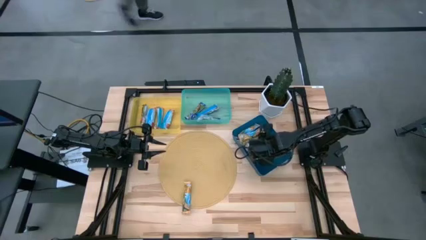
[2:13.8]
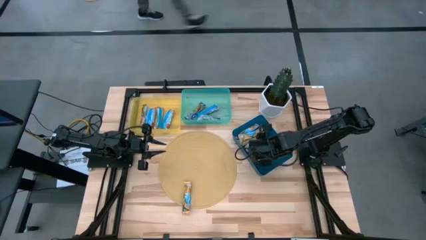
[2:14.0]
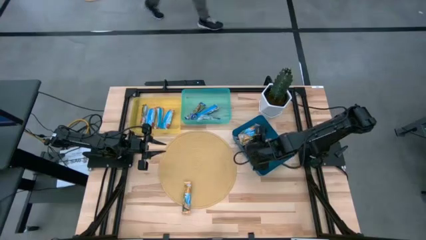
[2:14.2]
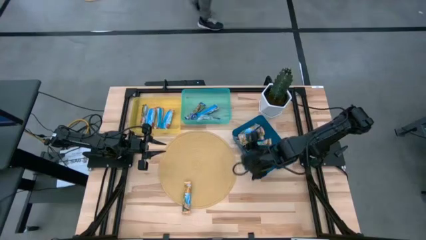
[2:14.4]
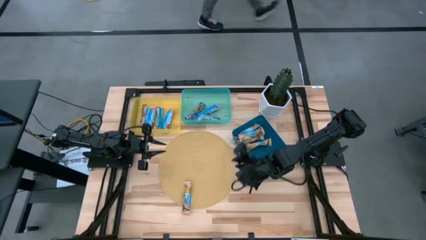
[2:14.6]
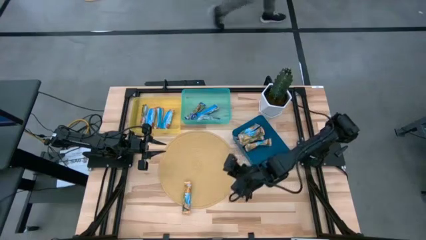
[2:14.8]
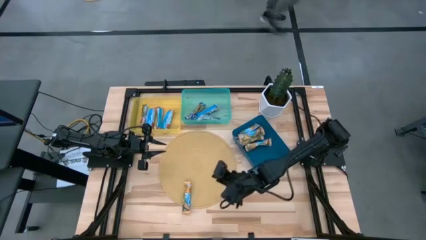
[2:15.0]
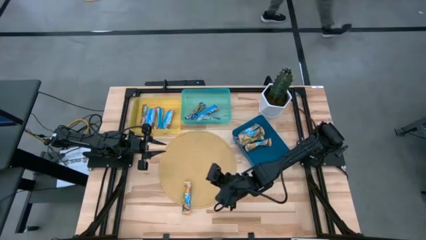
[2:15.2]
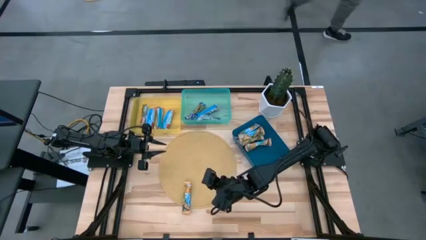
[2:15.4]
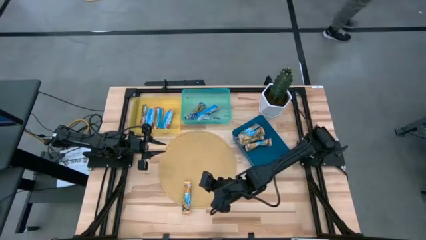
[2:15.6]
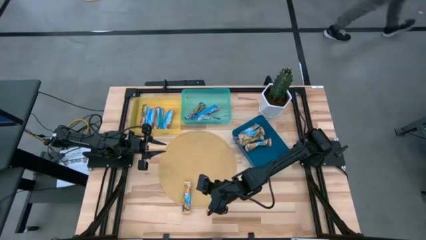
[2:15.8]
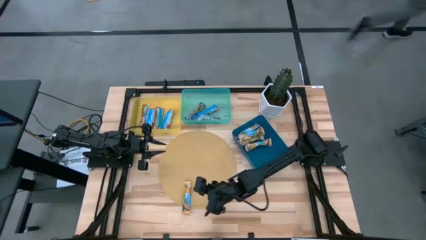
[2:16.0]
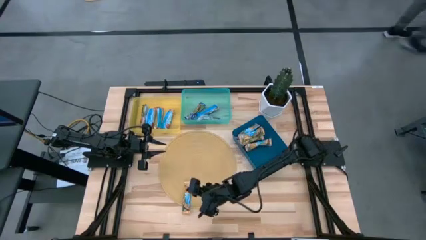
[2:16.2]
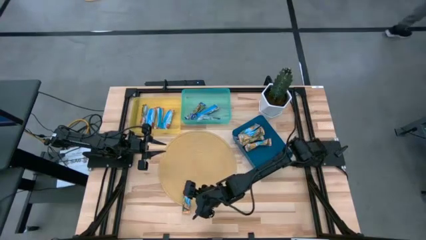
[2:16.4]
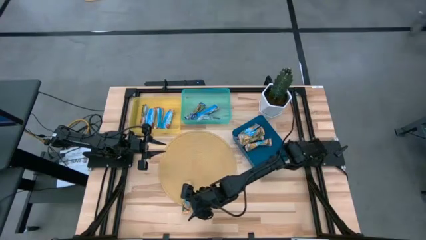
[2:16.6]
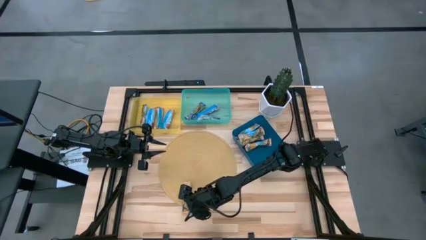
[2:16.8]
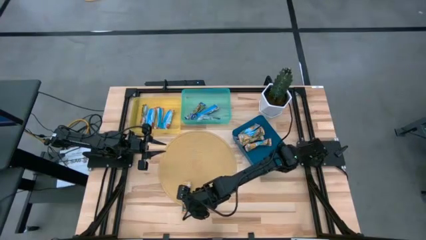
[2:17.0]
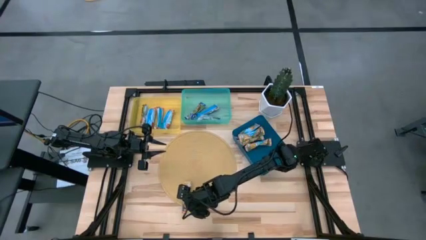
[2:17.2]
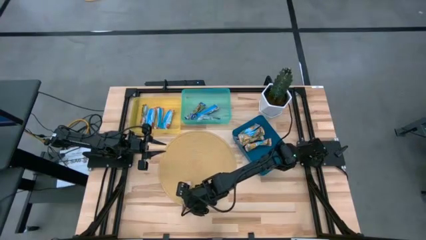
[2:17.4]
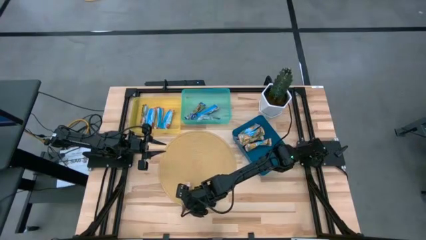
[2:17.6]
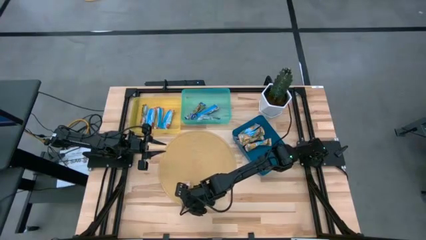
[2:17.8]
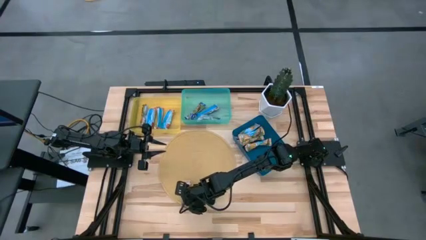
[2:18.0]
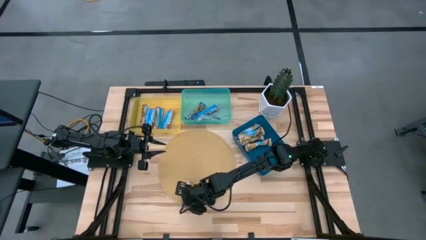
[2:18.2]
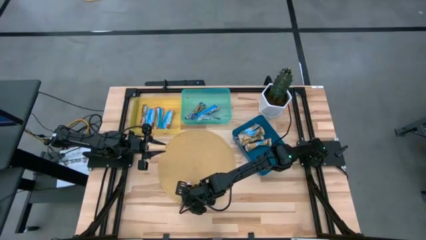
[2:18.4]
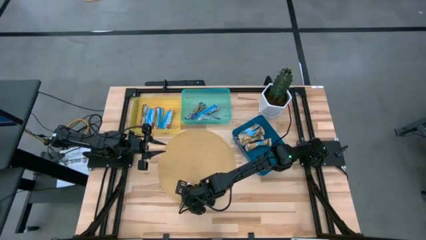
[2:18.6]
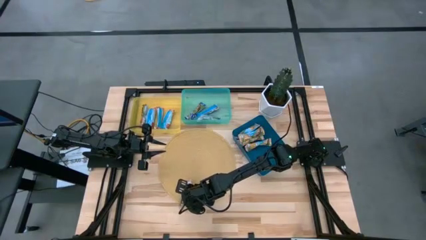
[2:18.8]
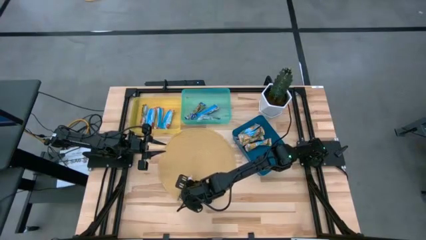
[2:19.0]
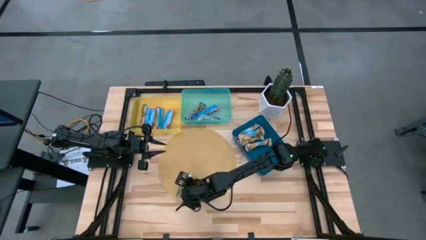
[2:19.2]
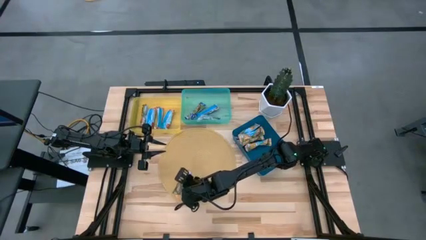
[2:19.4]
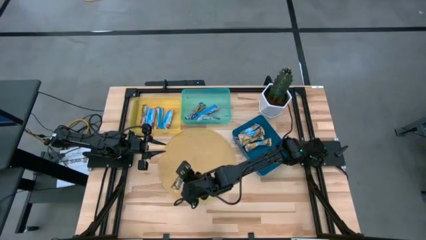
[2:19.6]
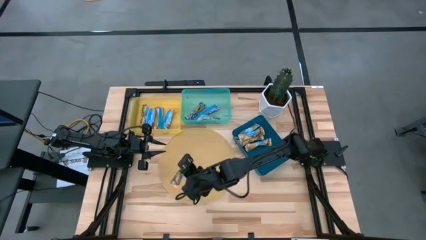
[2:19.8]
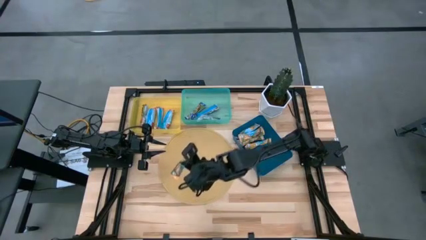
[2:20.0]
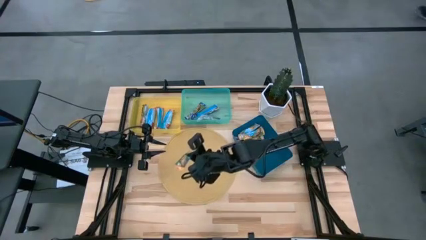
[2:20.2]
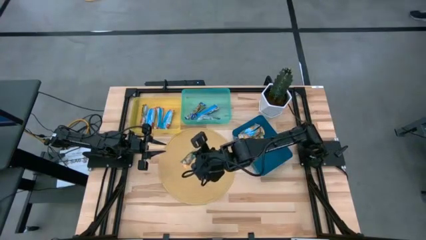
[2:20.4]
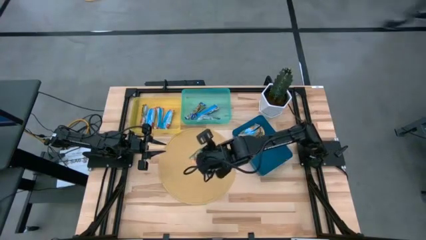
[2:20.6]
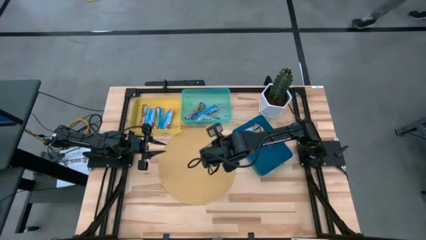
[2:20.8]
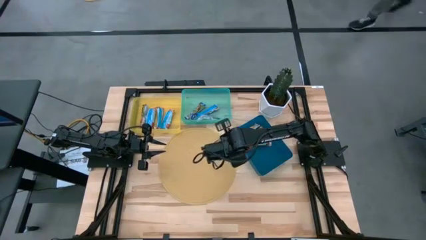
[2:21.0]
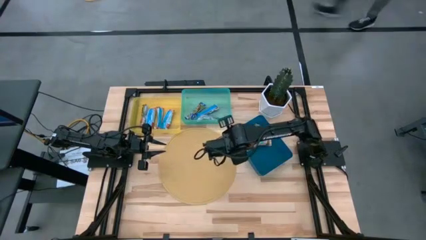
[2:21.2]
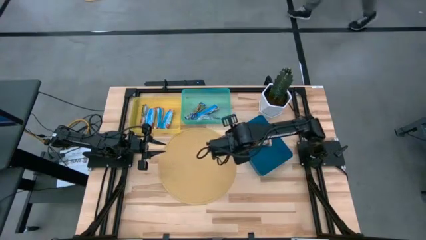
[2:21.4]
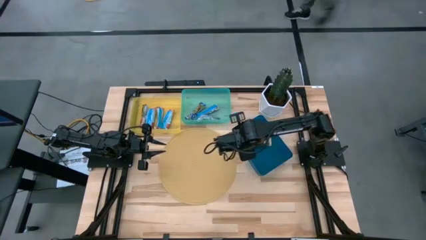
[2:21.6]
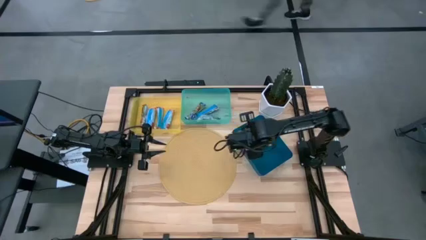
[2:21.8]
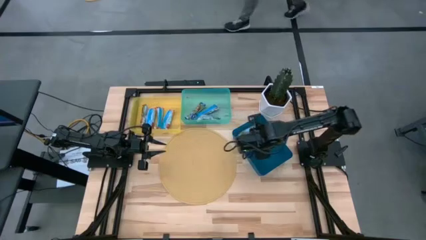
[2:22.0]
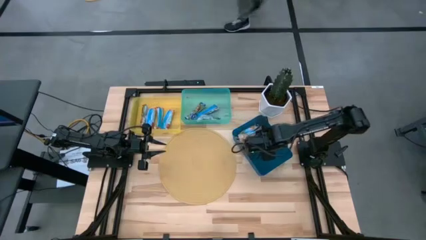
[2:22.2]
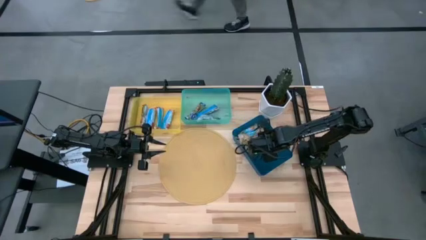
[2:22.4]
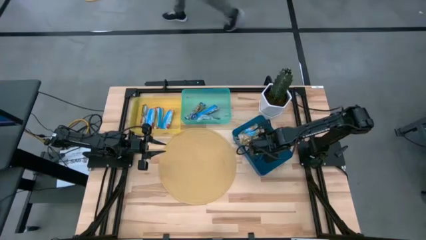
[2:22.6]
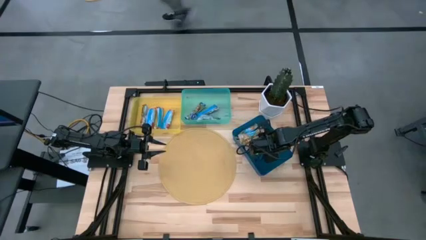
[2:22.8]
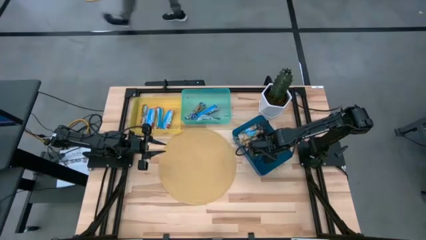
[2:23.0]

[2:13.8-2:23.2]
Task: Pick and place Granola Bars by type
Put the yellow granola bar into the blue bin

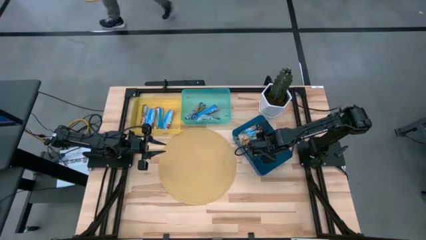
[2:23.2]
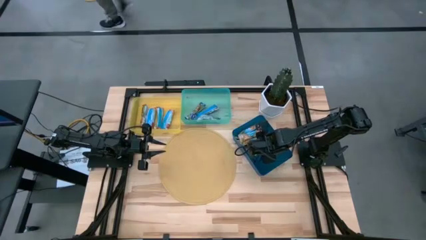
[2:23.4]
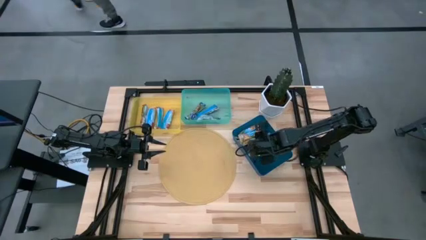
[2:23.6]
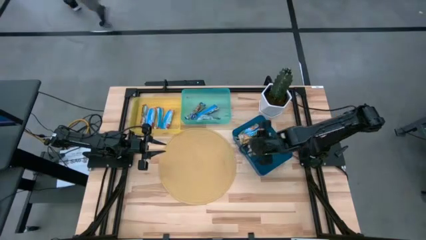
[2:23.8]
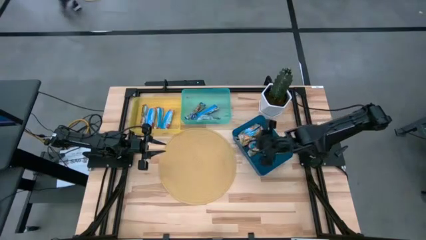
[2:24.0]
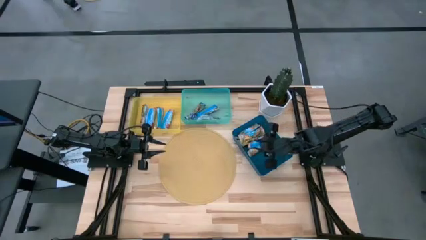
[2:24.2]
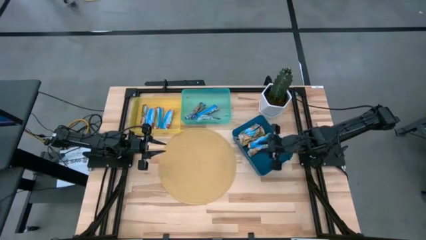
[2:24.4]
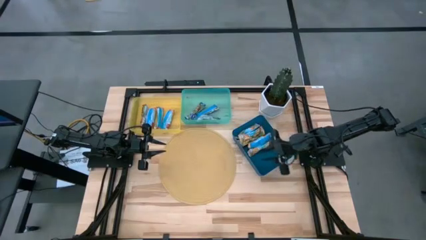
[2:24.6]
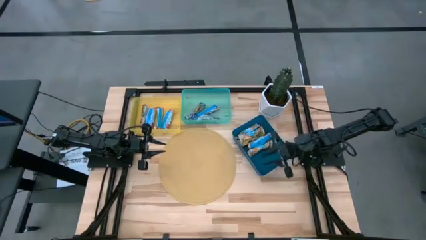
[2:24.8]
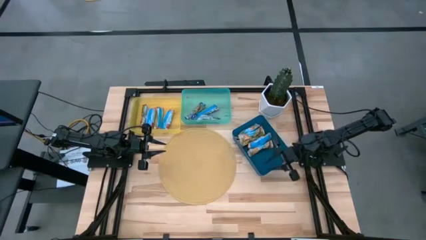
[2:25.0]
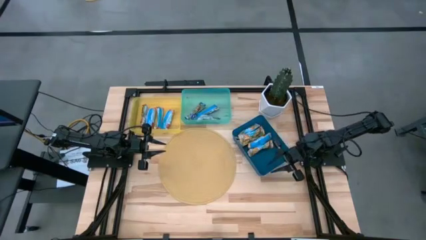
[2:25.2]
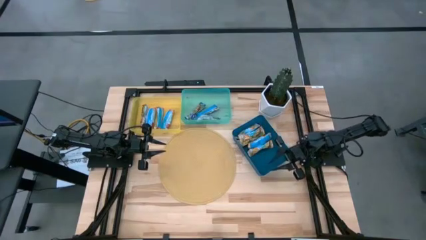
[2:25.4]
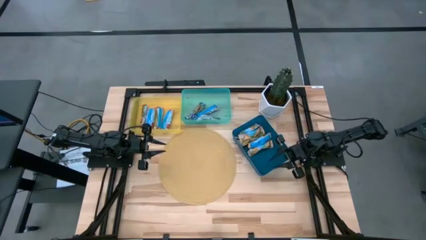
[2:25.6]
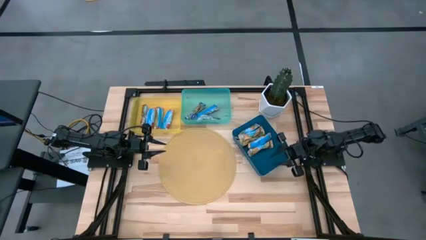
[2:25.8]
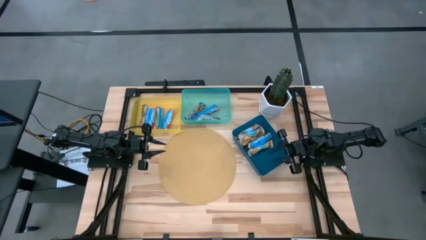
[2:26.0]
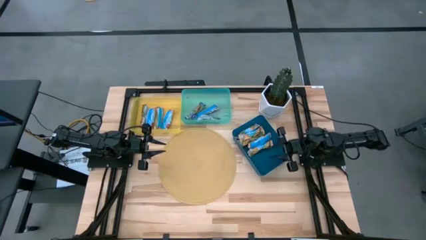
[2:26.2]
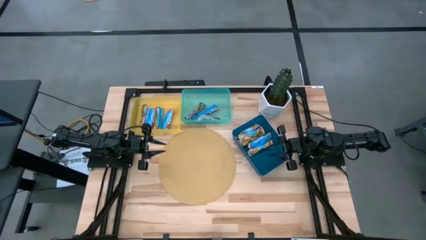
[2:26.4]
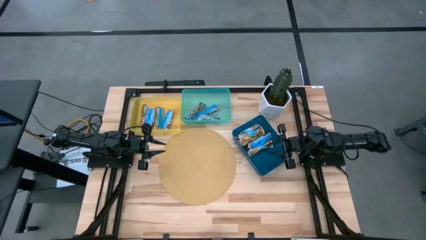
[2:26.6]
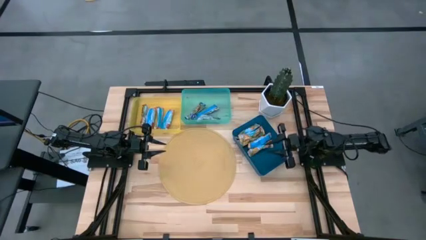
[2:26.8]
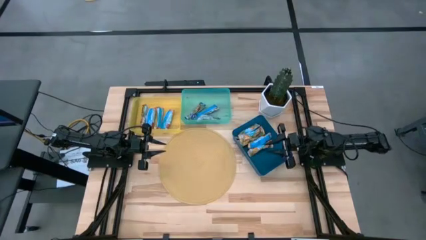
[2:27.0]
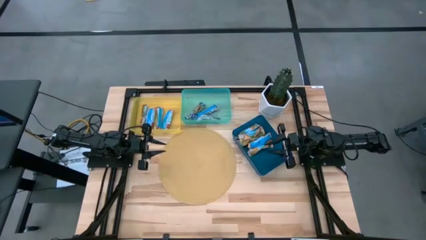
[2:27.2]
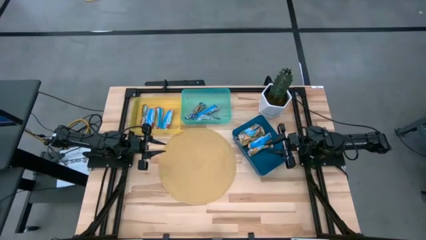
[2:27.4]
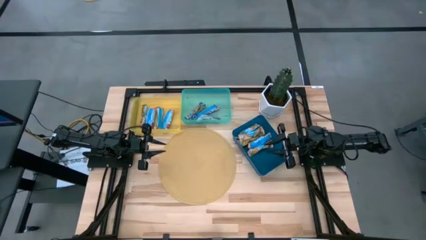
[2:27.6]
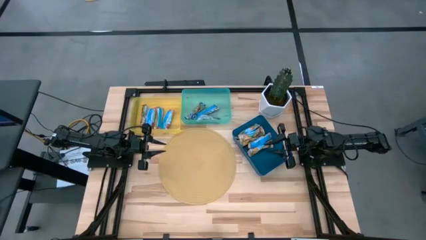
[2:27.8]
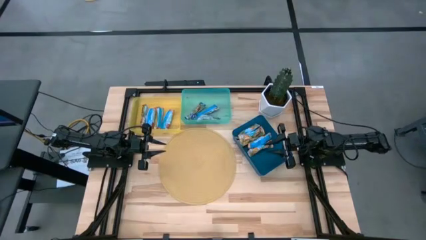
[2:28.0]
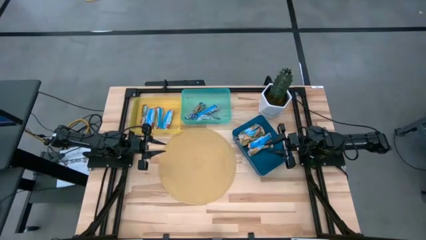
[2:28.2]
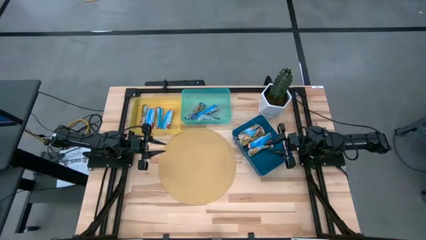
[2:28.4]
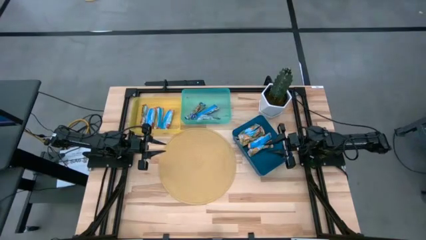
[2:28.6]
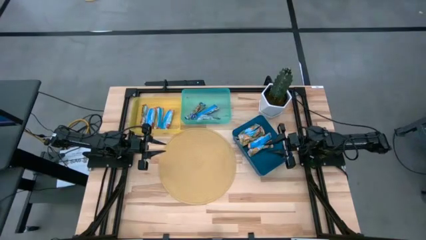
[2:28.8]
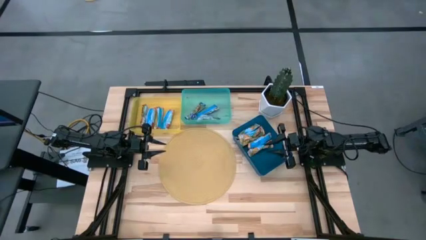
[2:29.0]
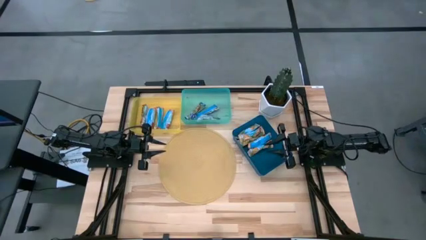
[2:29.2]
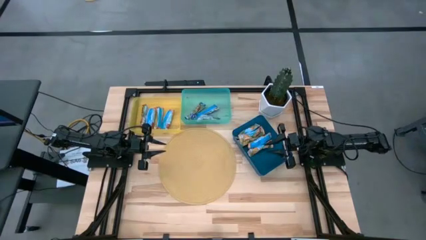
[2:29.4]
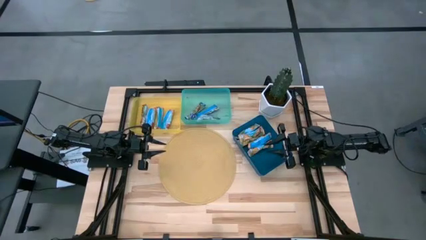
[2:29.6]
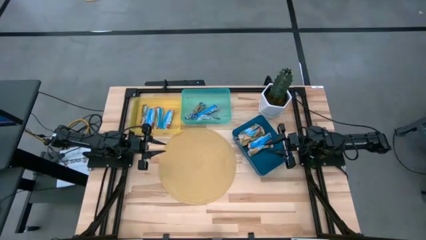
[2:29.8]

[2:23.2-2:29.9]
Return to Home Position
